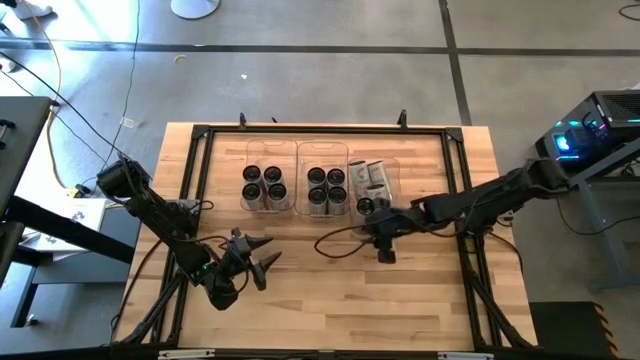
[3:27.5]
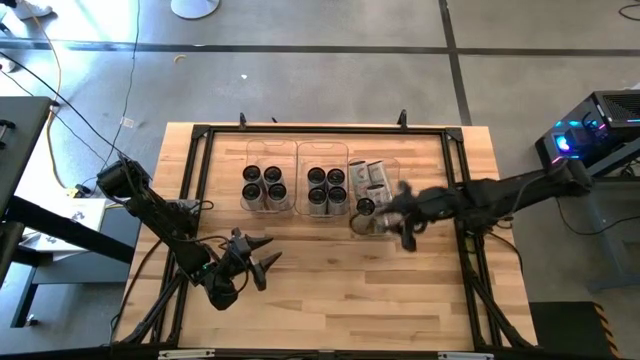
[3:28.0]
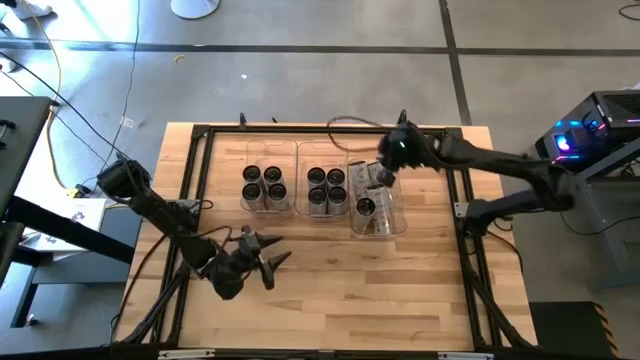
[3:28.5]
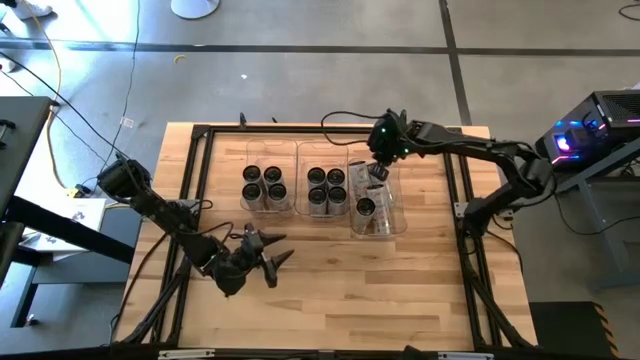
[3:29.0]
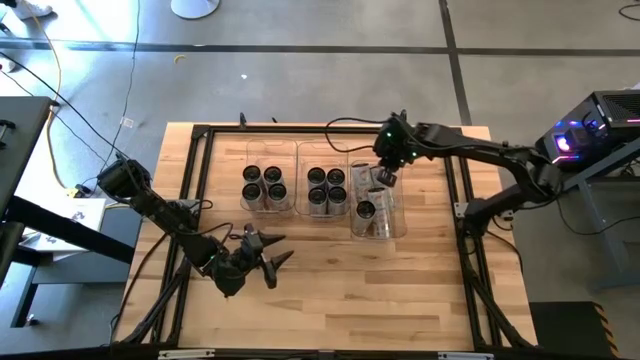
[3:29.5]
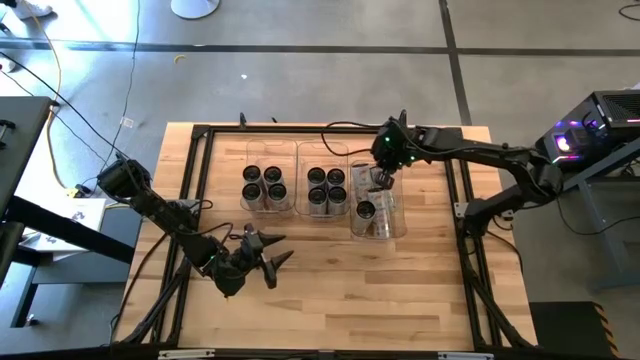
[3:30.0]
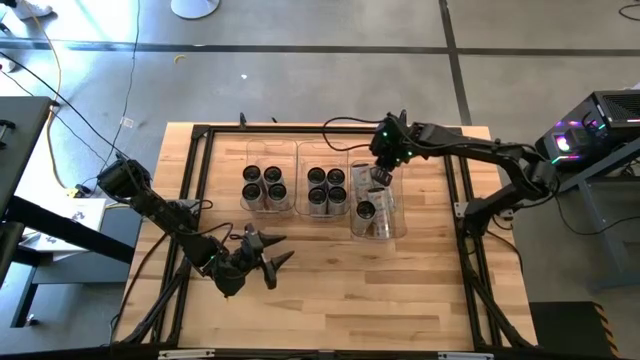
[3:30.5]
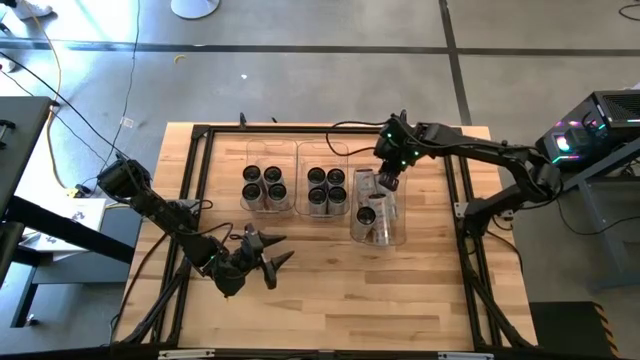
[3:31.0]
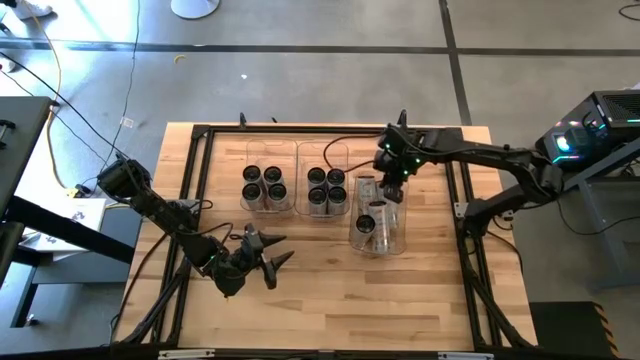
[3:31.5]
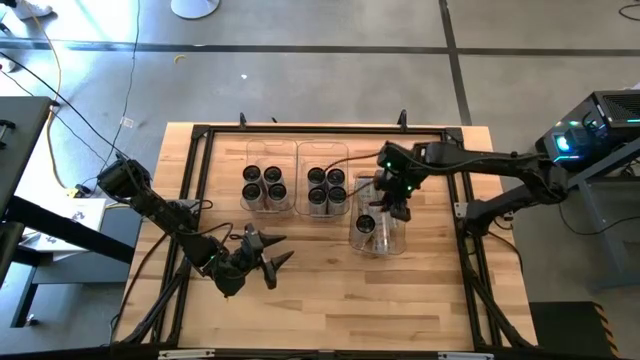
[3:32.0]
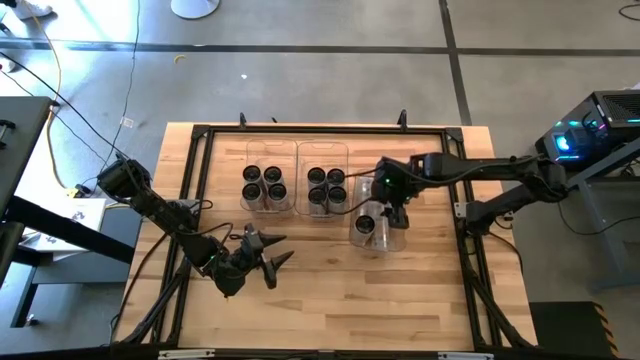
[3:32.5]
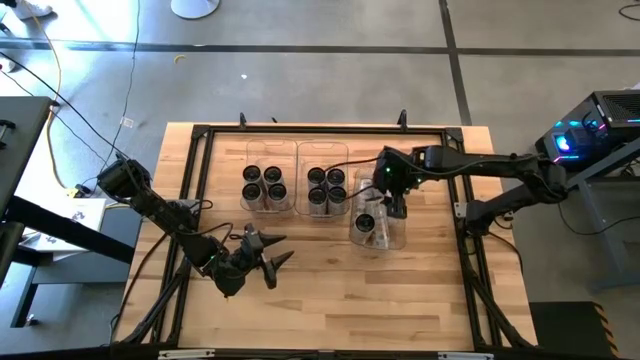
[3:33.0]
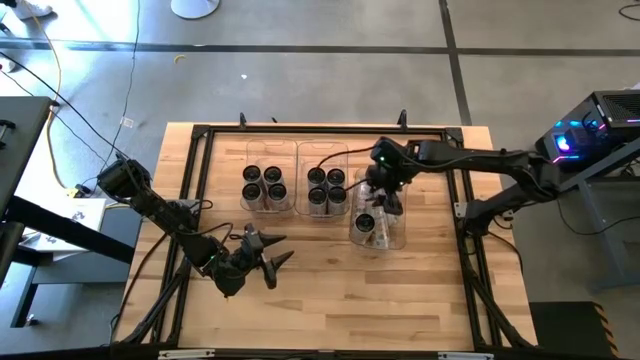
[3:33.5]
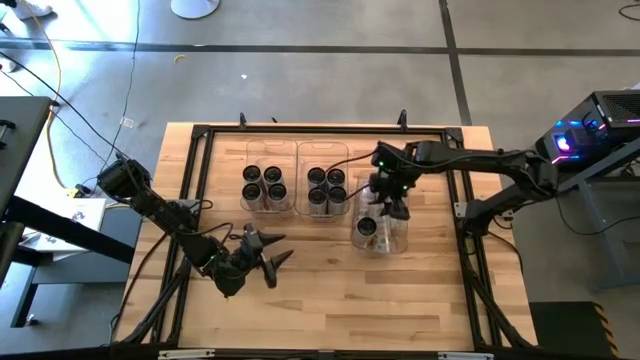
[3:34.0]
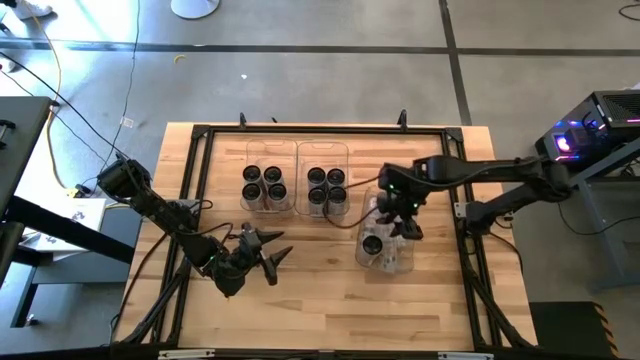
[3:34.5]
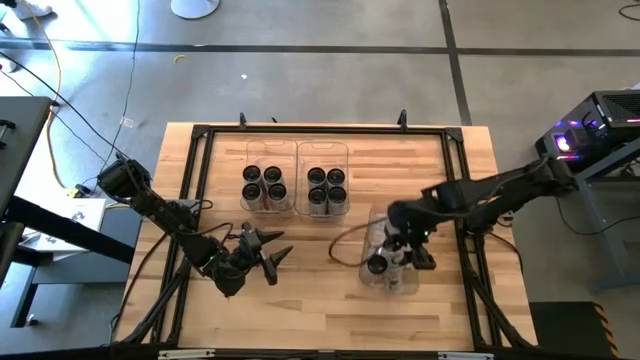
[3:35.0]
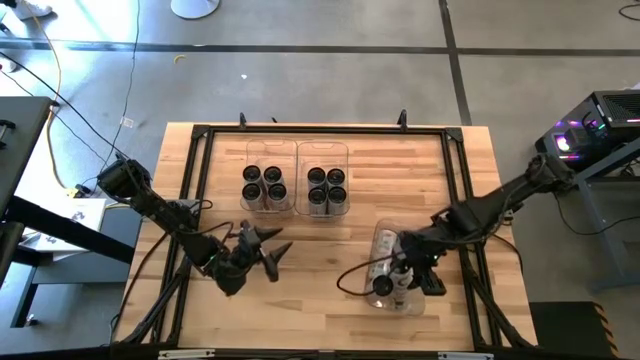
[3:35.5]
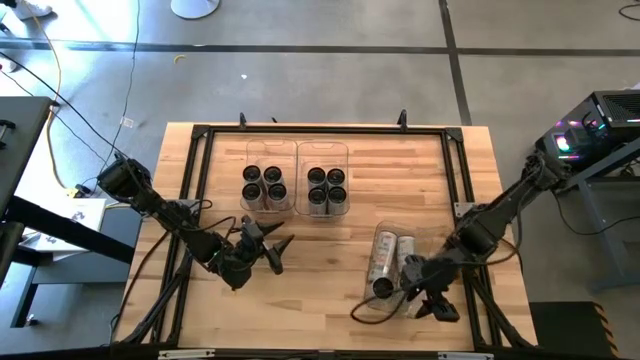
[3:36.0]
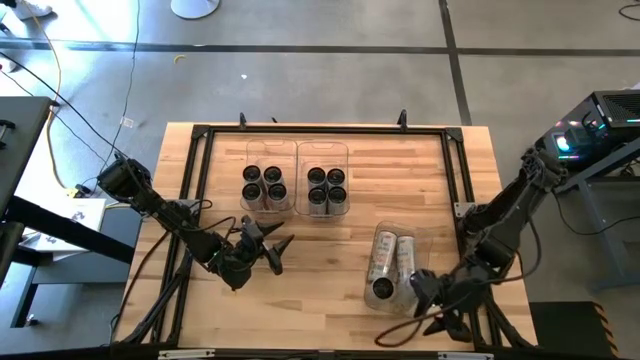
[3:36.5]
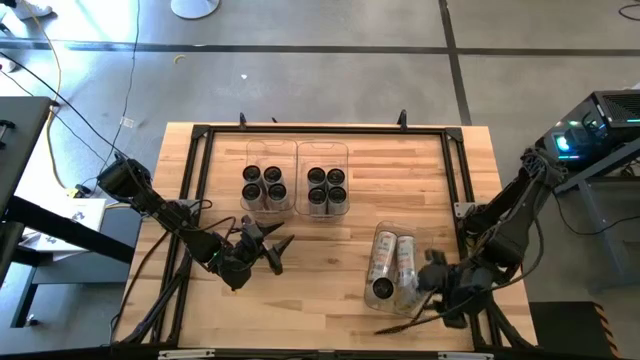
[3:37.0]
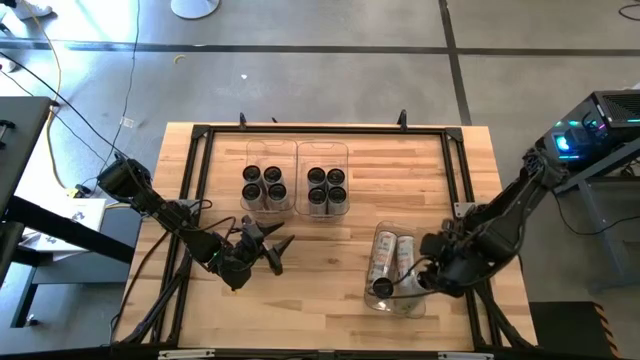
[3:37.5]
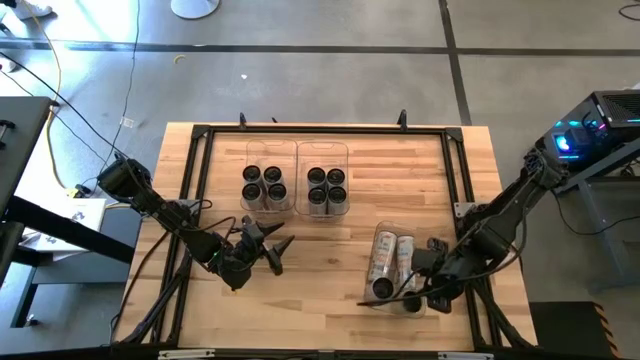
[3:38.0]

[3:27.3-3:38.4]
Task: Sort soda cans
Adjust the white-yellow soda cans

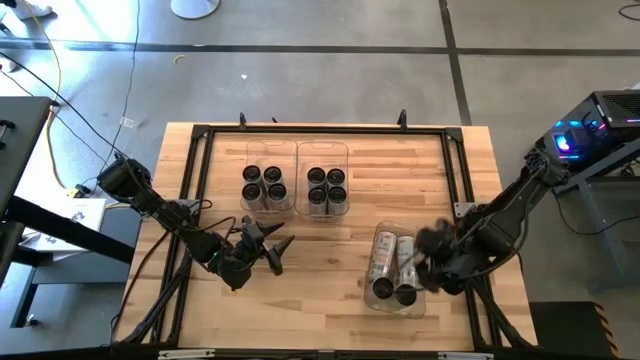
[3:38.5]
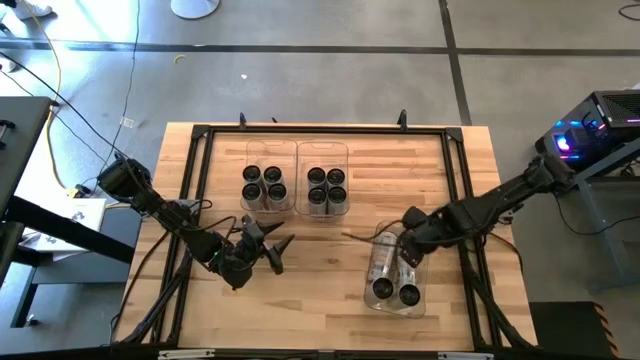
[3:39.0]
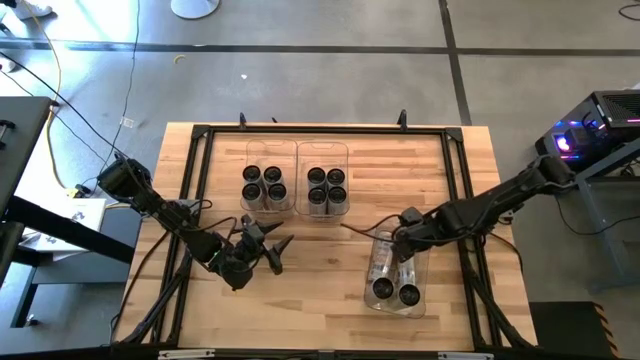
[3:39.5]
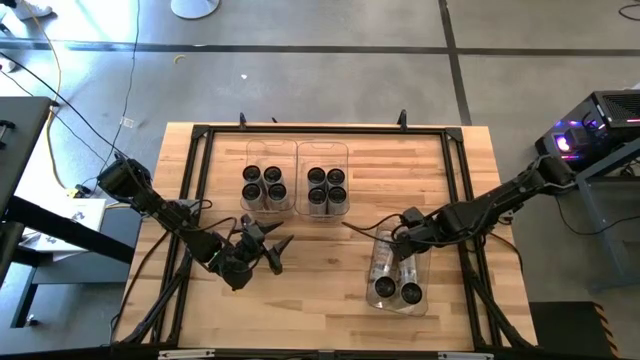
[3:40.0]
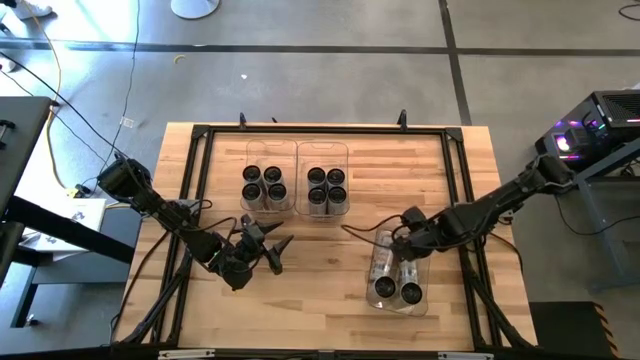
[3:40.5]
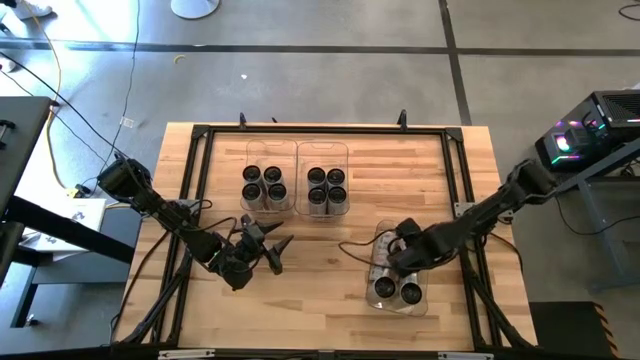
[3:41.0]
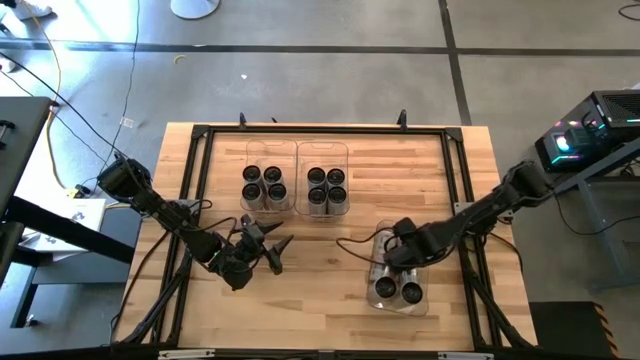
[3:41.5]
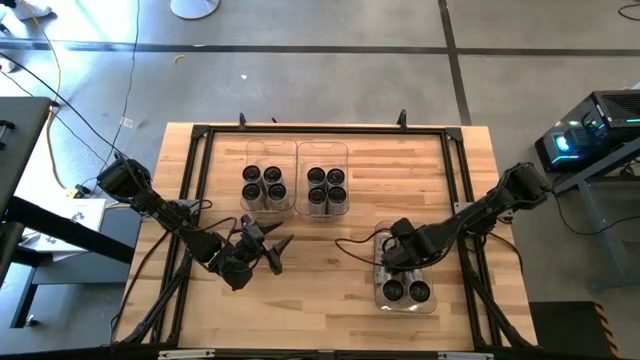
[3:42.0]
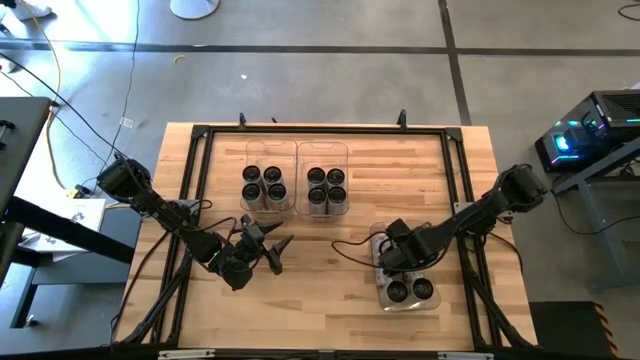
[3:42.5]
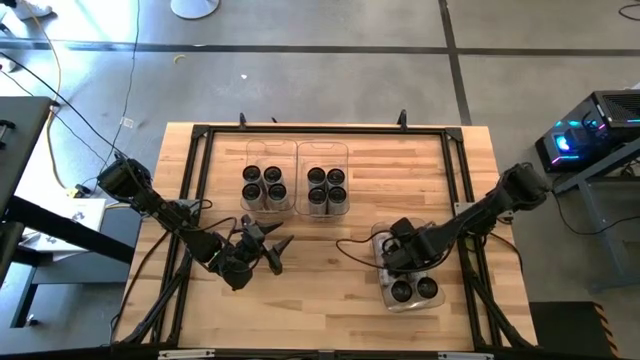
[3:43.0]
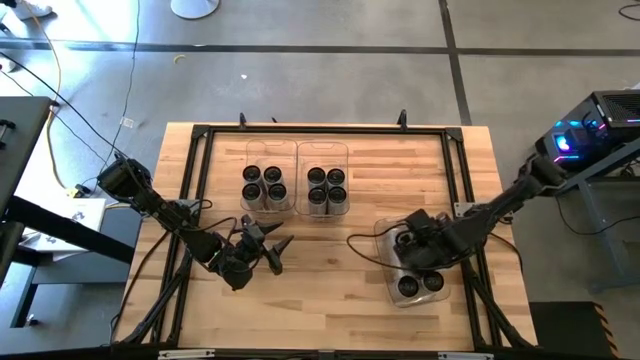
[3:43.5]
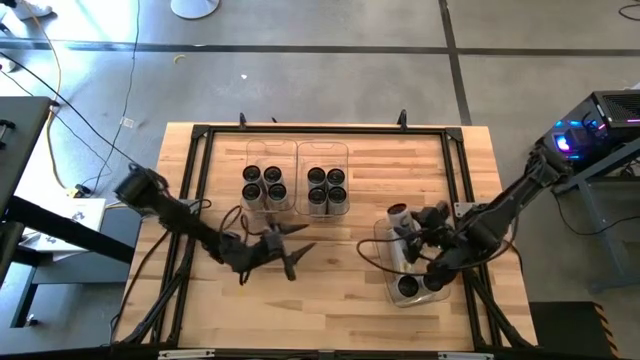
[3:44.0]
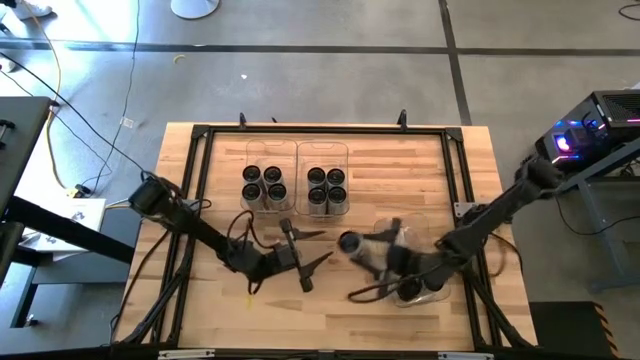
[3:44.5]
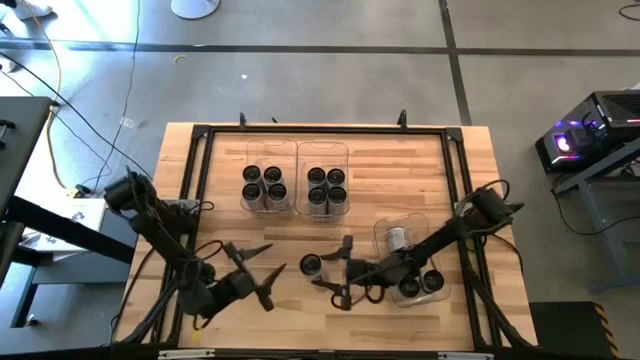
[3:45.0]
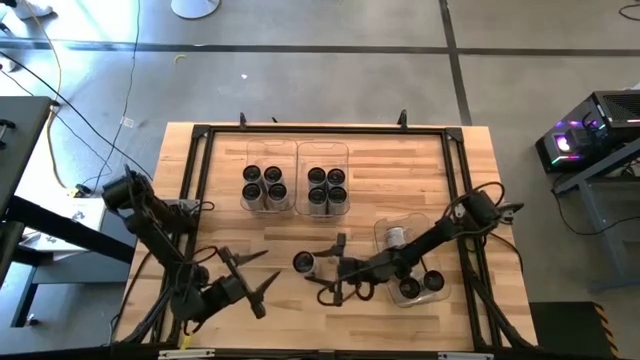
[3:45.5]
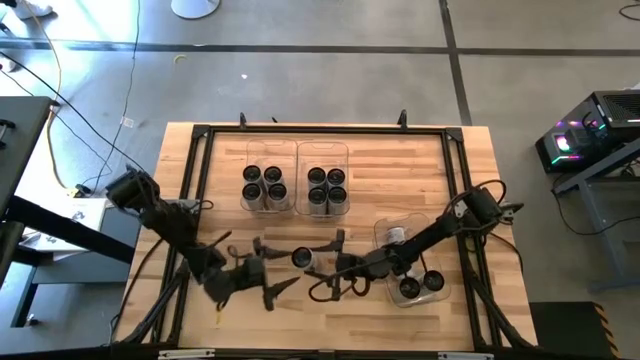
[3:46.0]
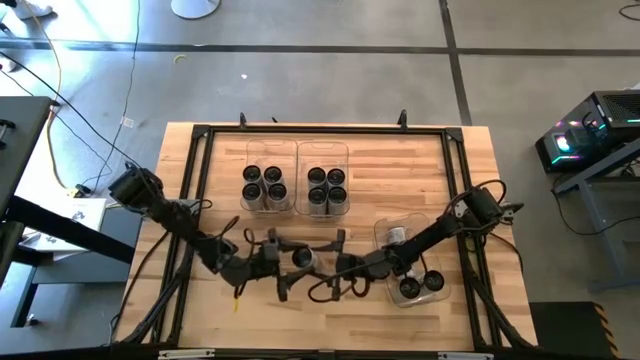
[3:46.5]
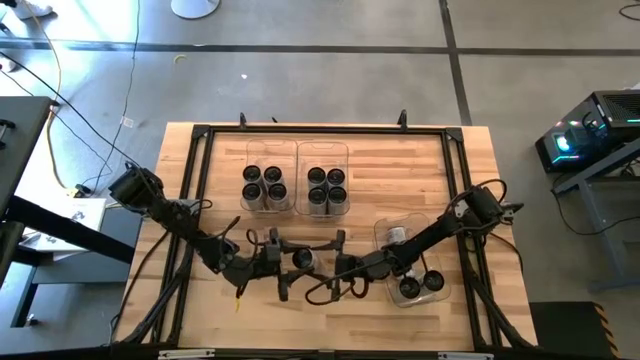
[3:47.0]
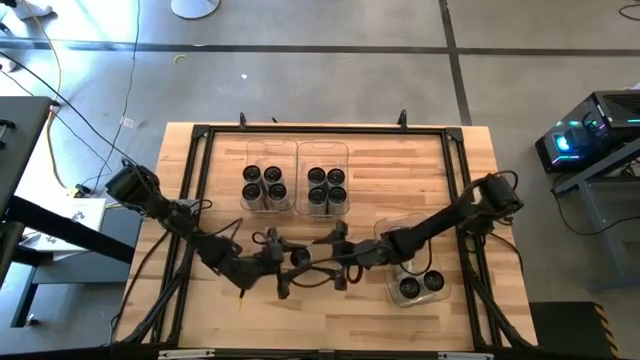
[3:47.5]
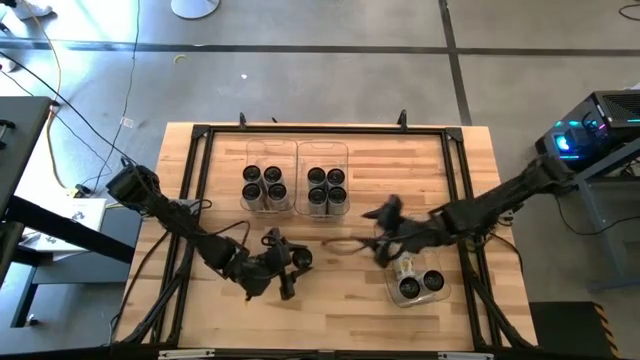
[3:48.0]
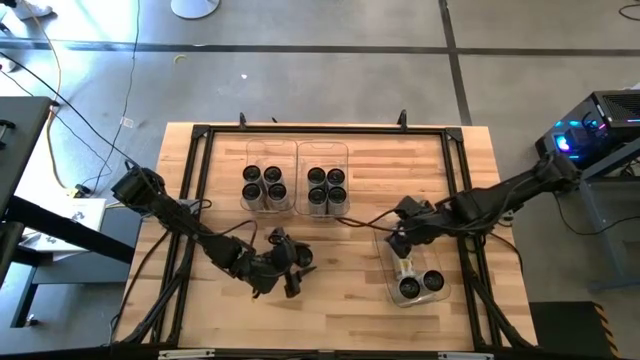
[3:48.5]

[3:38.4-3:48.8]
Remove the white-yellow soda can from the right transparent bin
